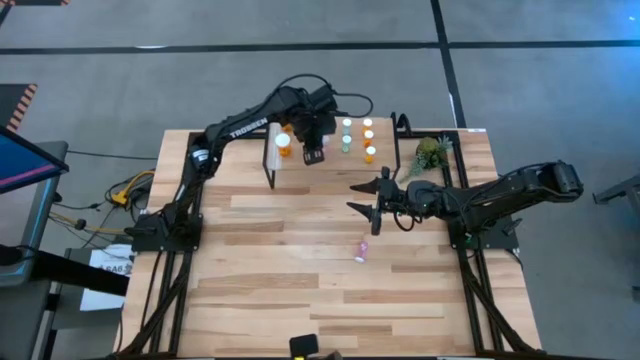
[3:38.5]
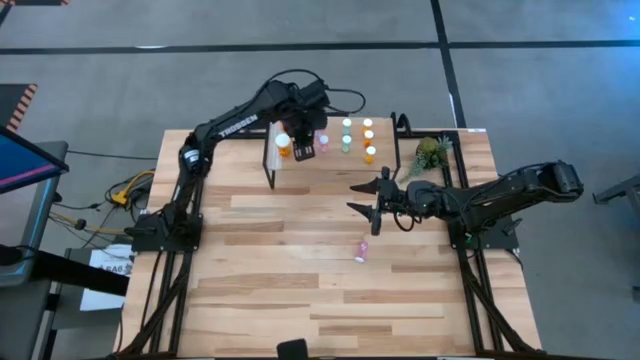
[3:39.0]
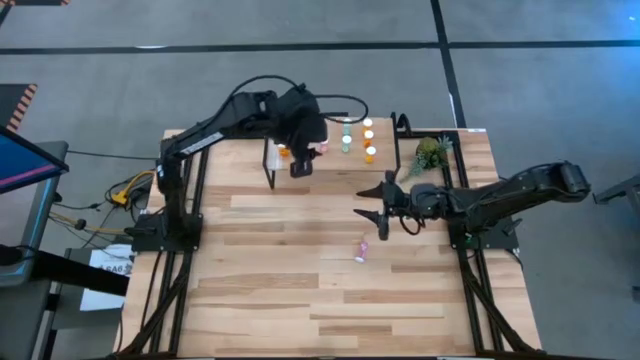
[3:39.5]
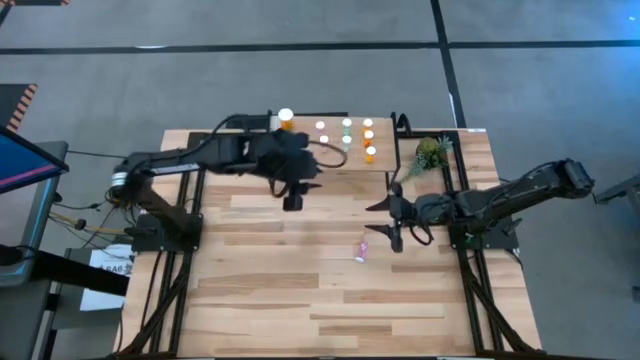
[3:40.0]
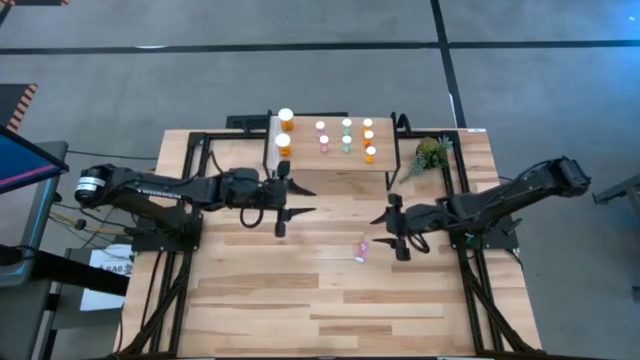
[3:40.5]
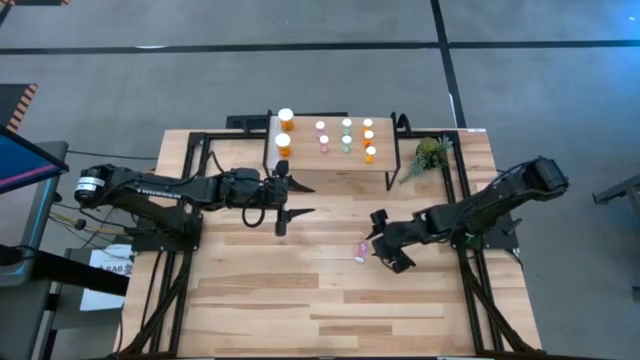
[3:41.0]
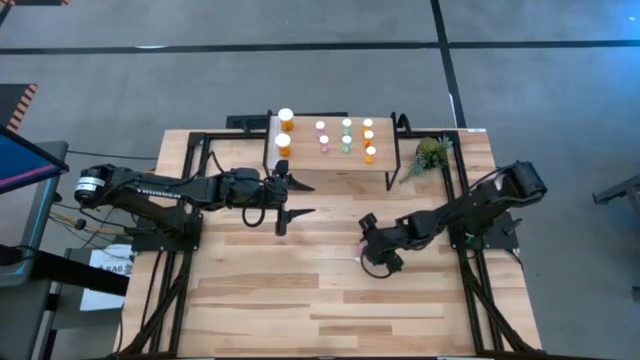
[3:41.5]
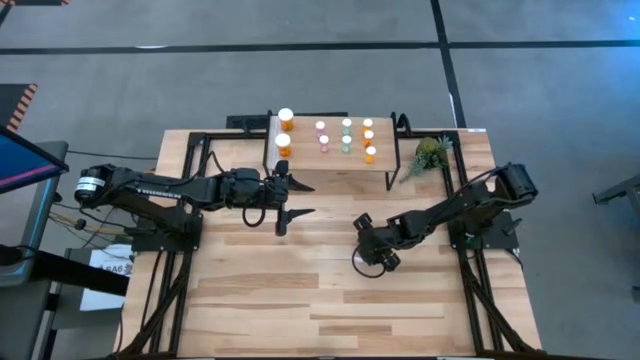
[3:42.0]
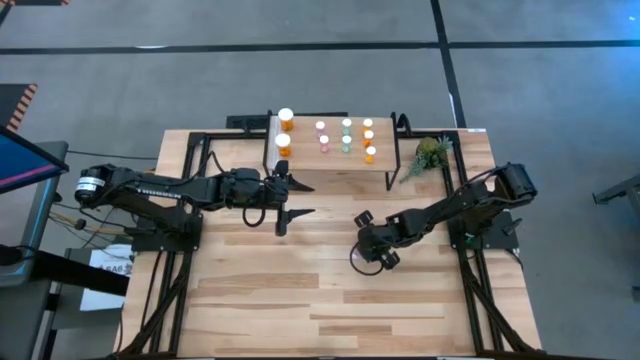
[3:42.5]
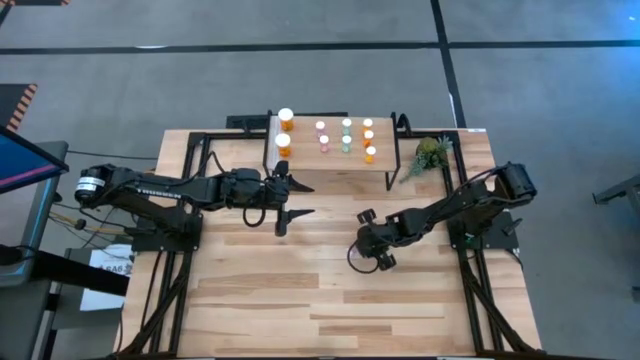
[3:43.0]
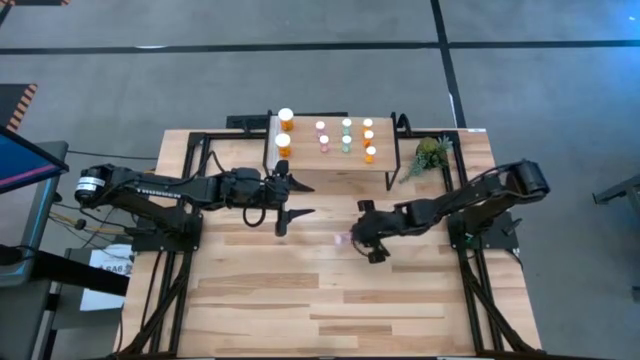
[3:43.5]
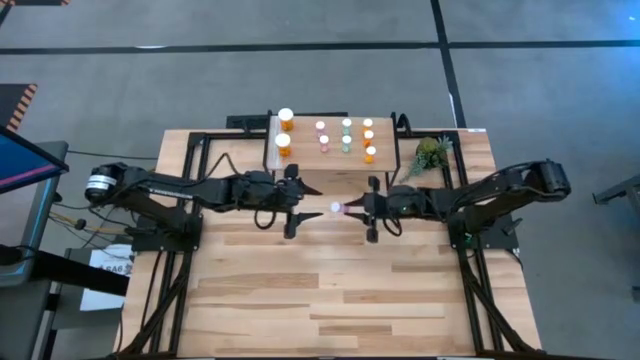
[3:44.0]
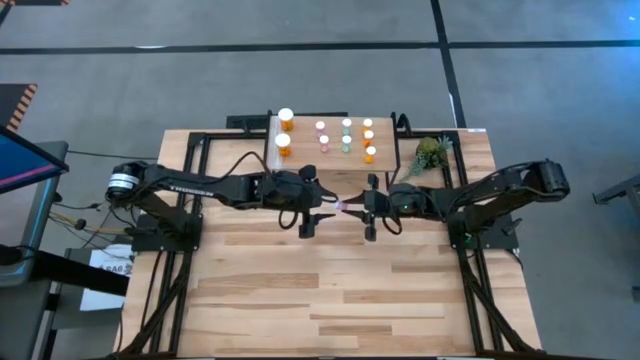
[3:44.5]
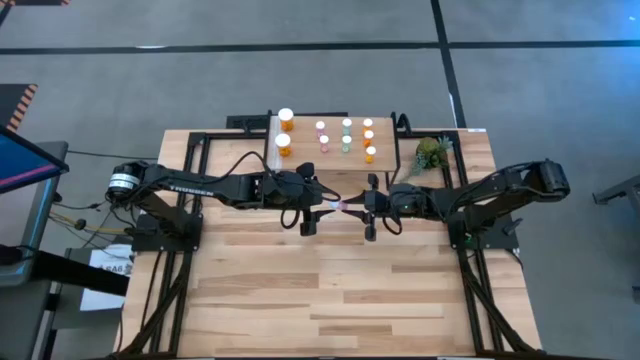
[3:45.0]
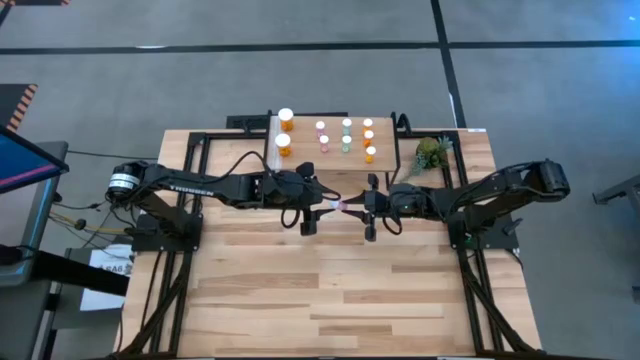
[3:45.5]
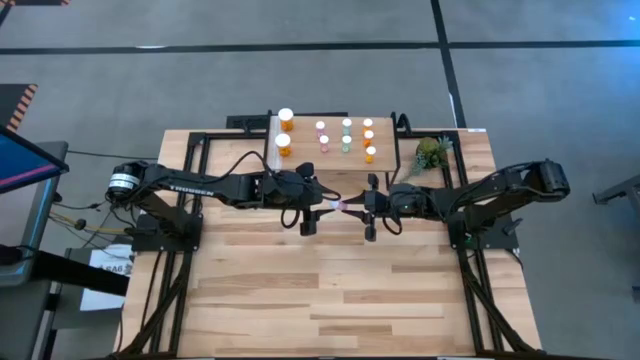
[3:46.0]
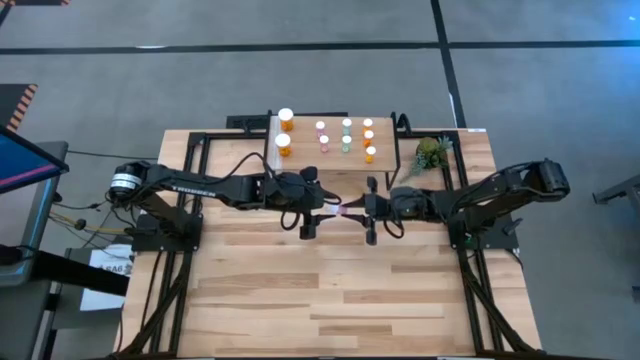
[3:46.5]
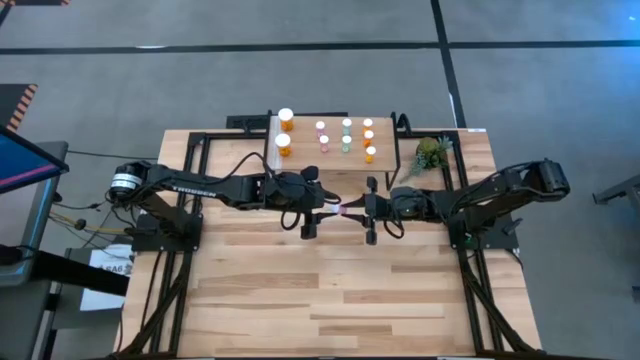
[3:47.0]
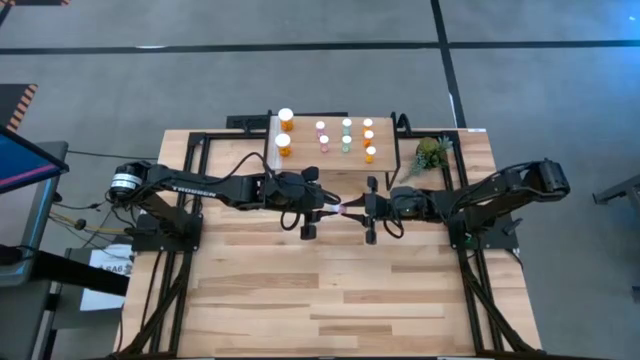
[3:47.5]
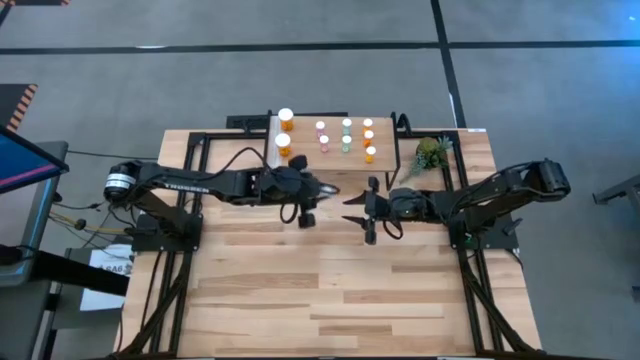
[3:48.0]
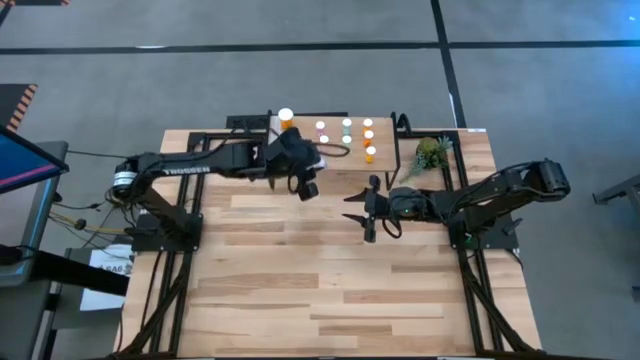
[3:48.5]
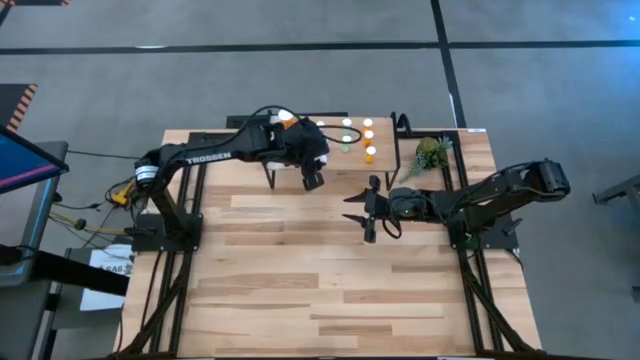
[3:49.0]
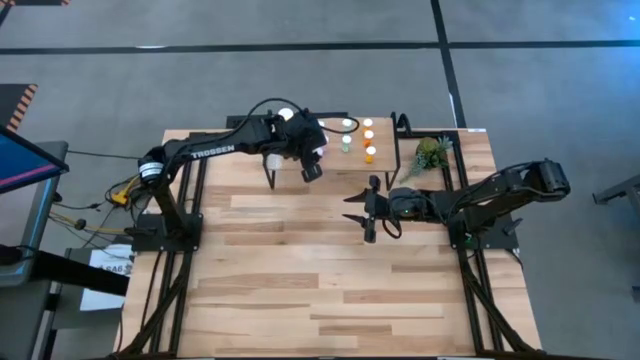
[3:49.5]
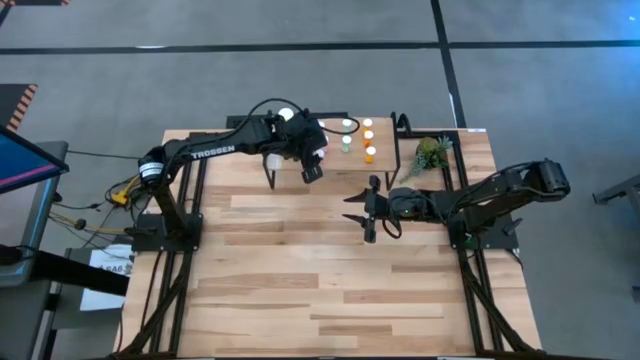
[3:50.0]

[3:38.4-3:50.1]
Task: Pick and place medicine bottles onto shelf by color
Put the pink pill bottle on the shelf aligned with the pink pill bottles

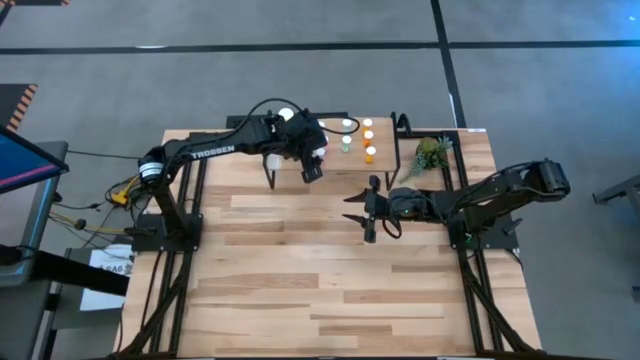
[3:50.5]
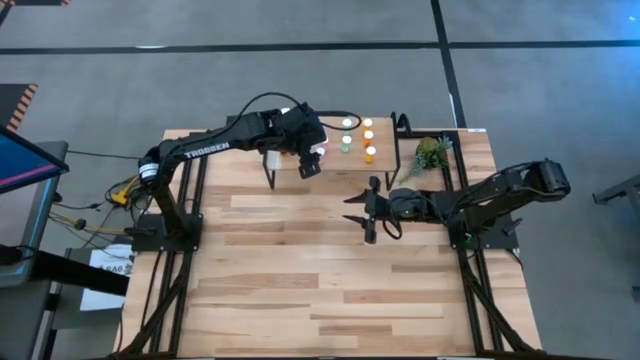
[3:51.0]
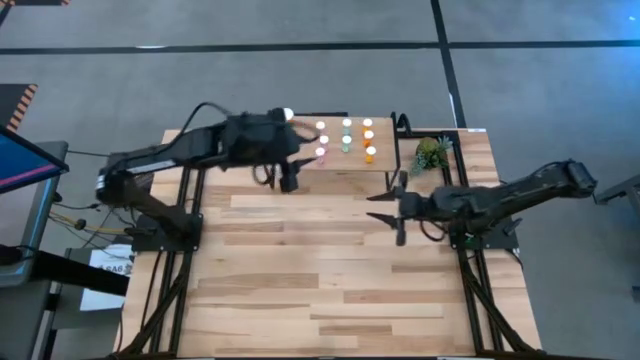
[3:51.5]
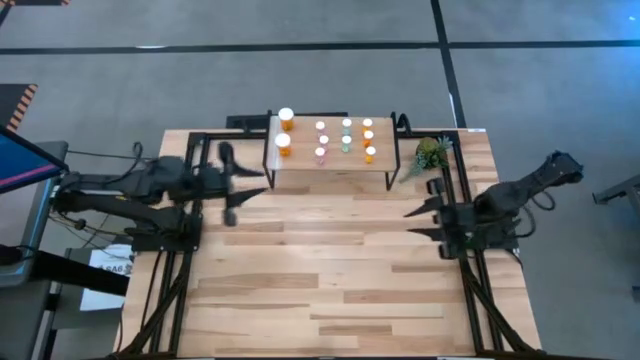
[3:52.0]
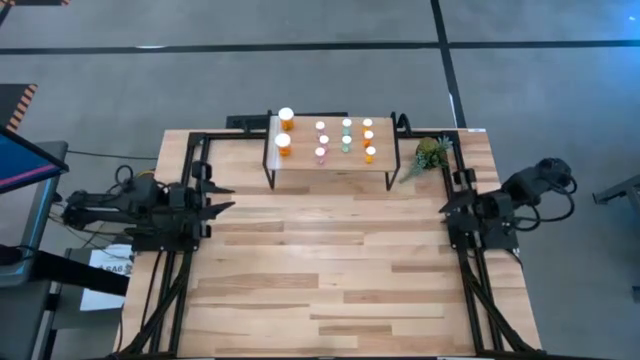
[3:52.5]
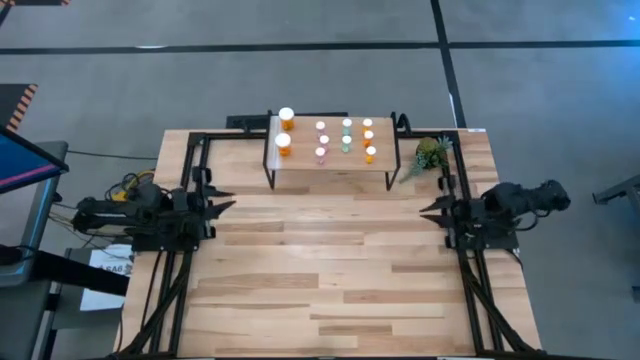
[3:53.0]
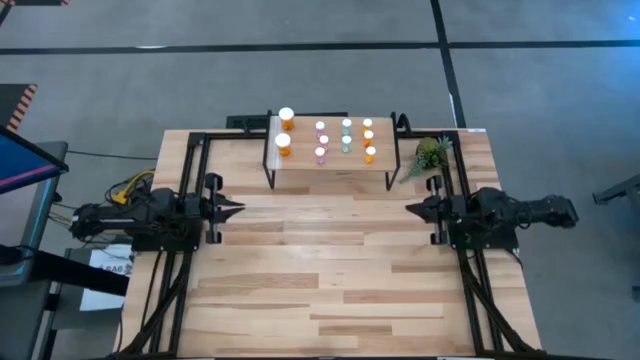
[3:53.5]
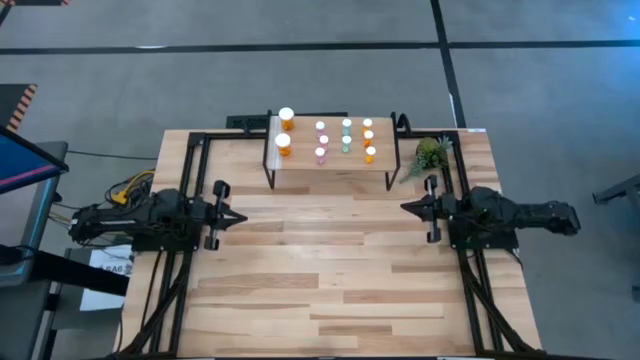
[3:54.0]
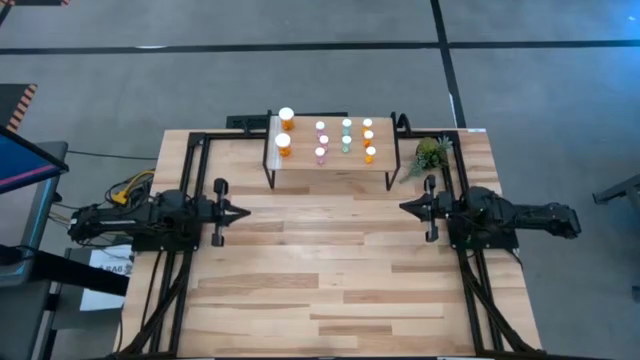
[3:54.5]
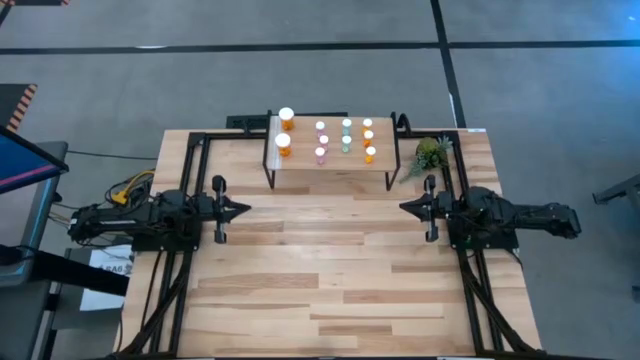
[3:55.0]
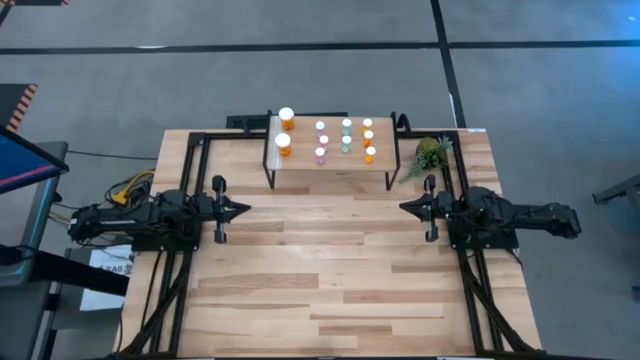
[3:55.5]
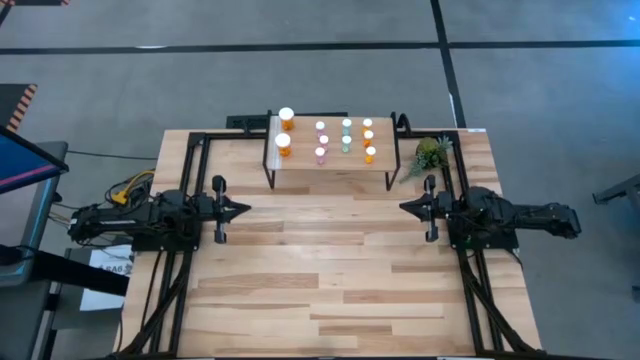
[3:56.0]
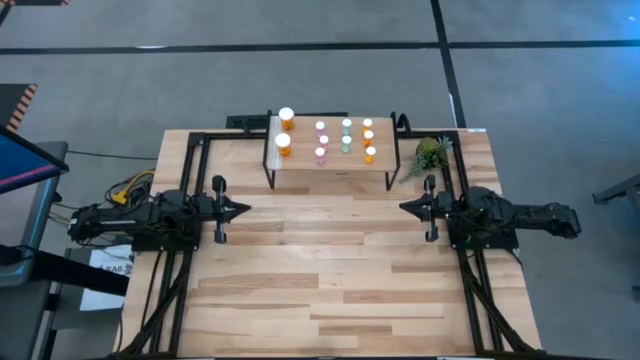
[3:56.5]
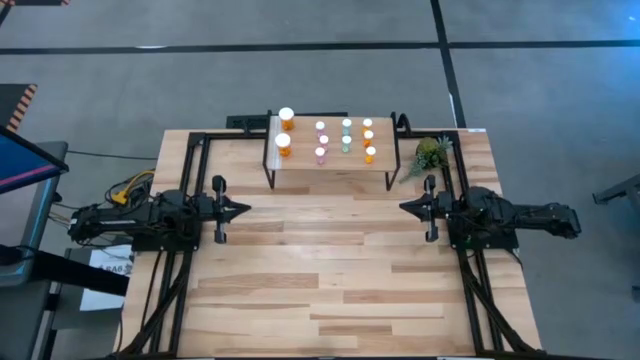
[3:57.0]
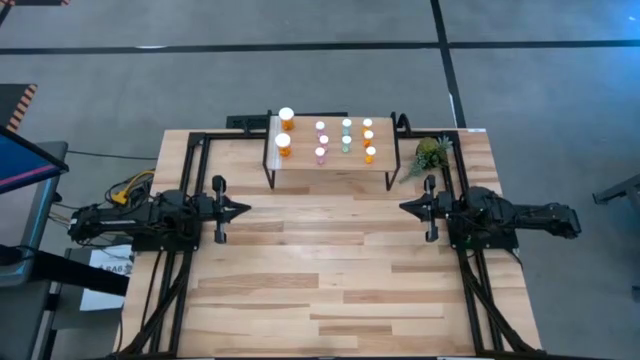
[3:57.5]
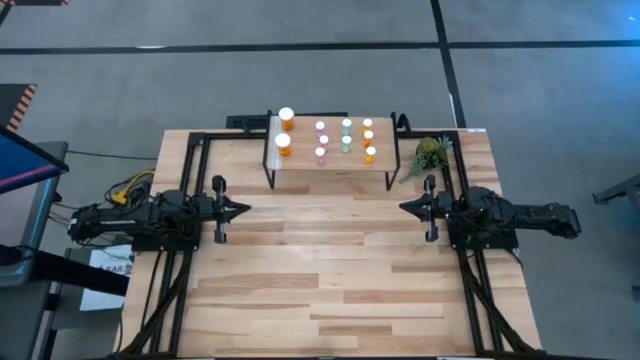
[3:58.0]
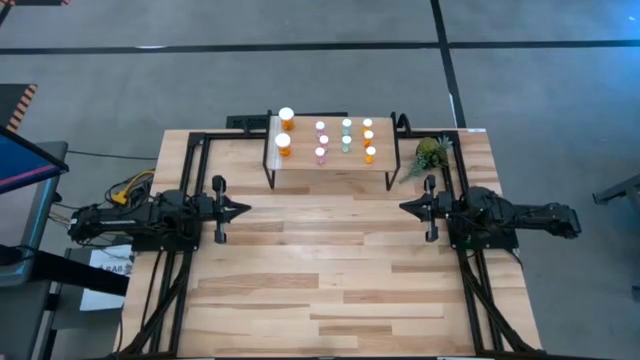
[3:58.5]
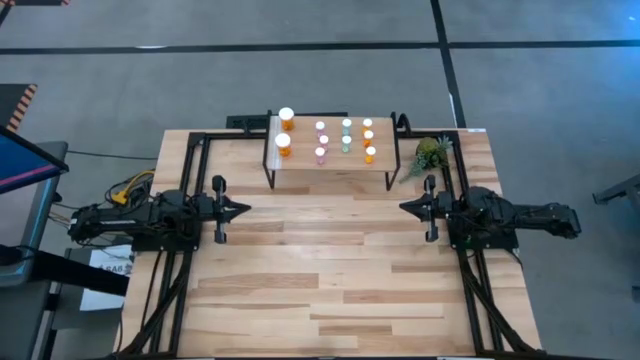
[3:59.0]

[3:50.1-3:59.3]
Return to Home Position

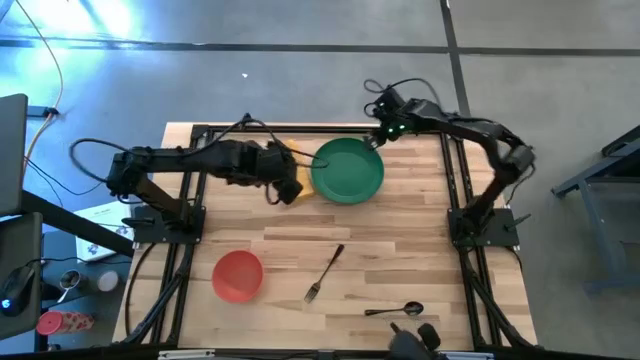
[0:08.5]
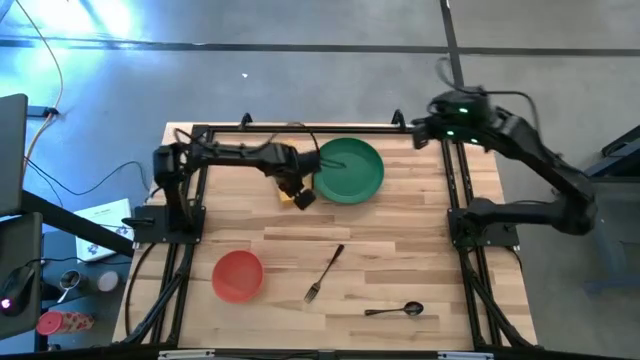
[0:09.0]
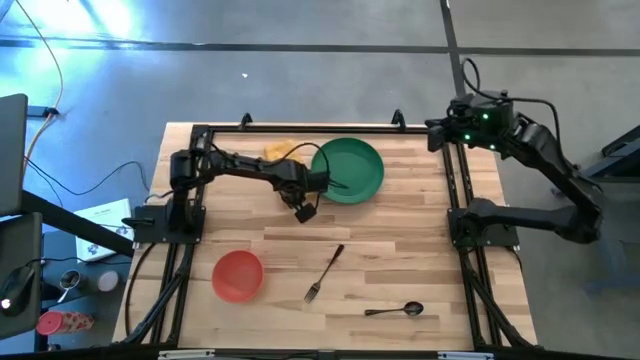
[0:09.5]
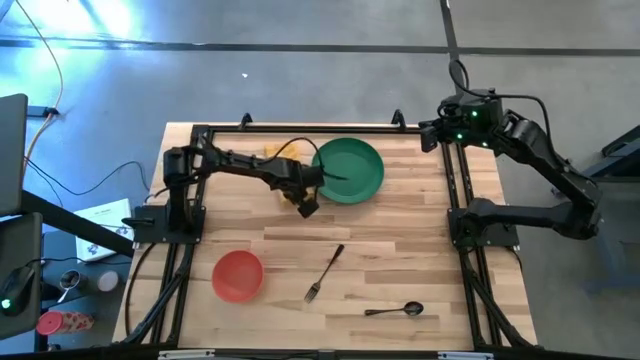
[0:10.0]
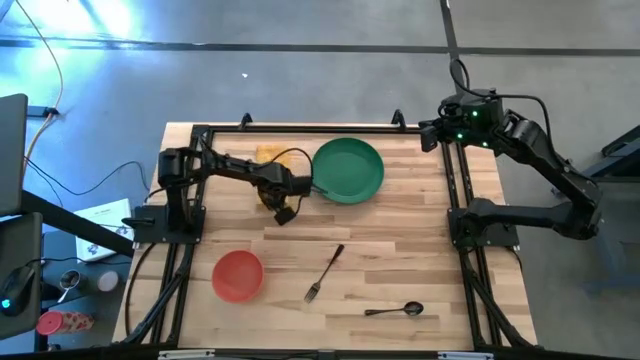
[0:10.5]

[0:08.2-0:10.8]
Task: Set table place
Adjust the yellow napkin on the table
